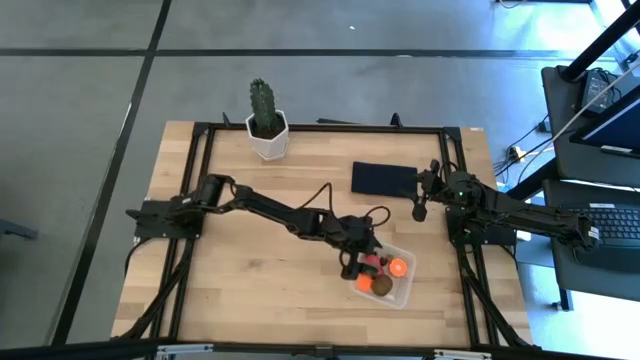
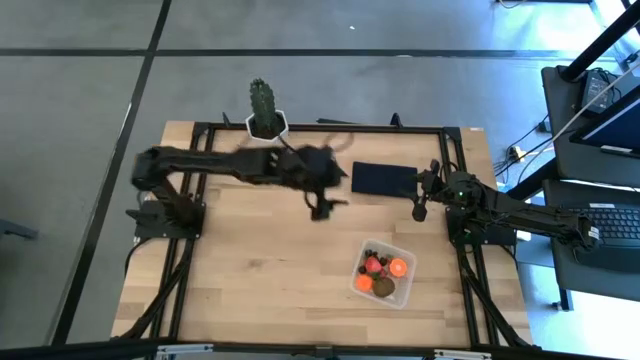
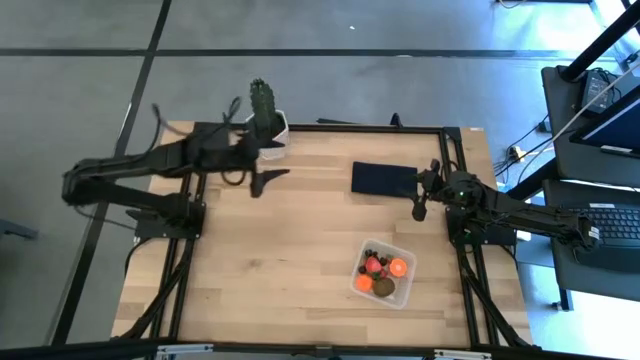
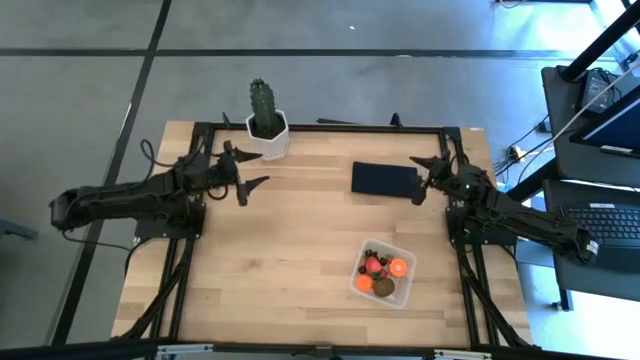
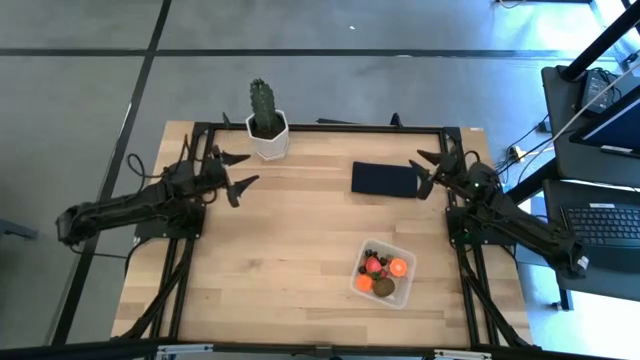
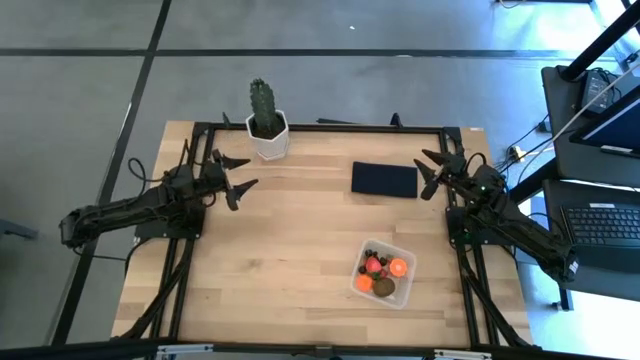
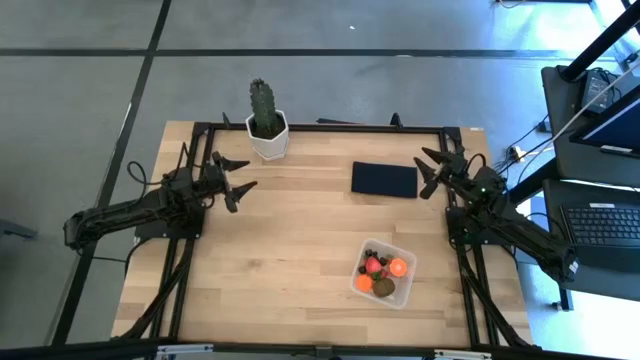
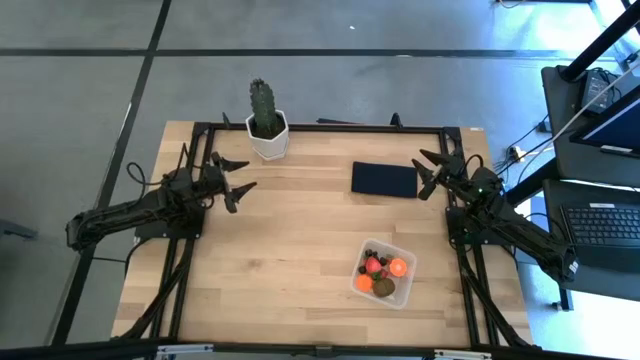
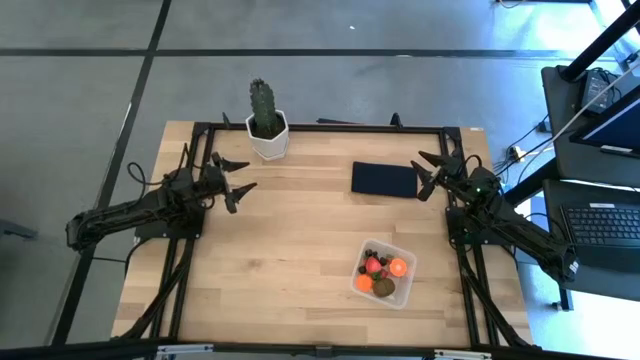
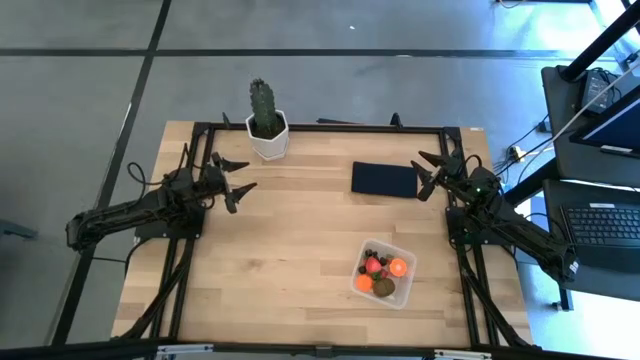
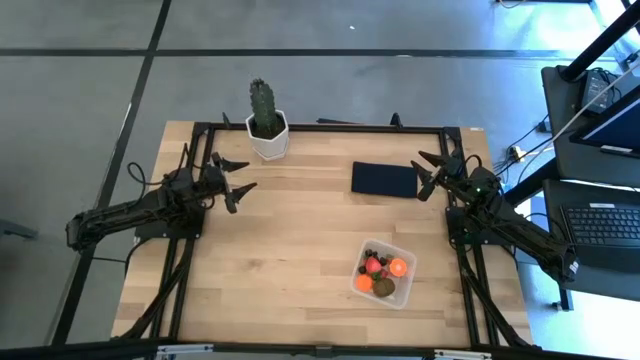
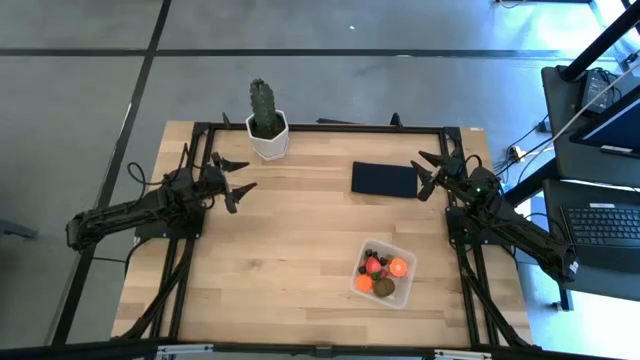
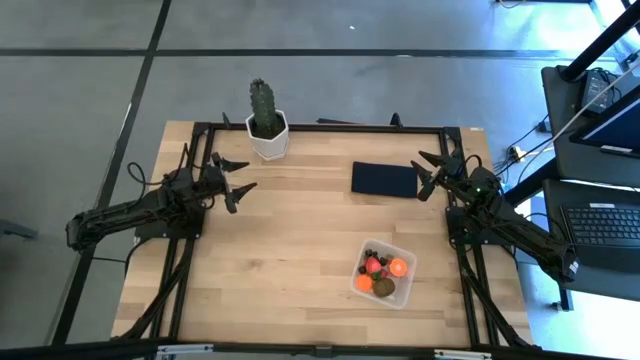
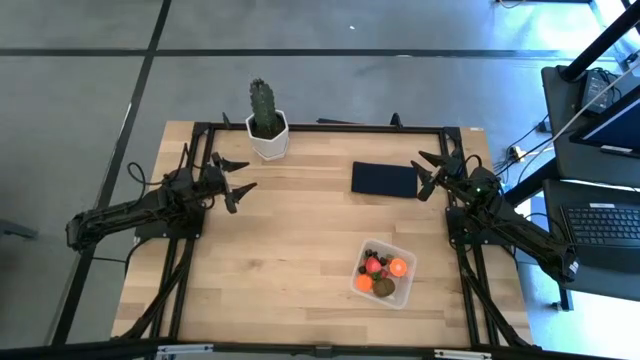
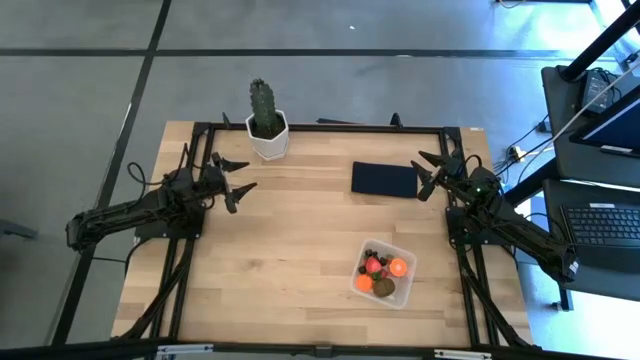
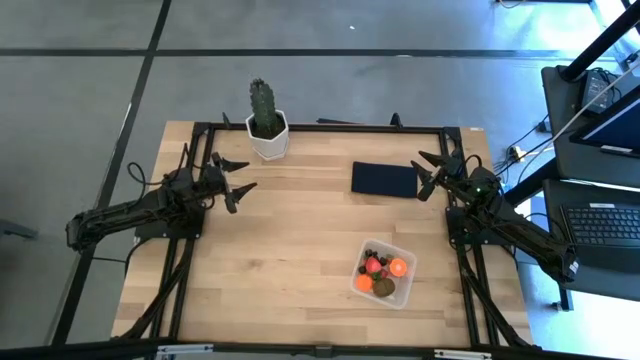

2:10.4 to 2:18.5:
Task: Pick and placing Produce into tupperware
Return to Home Position

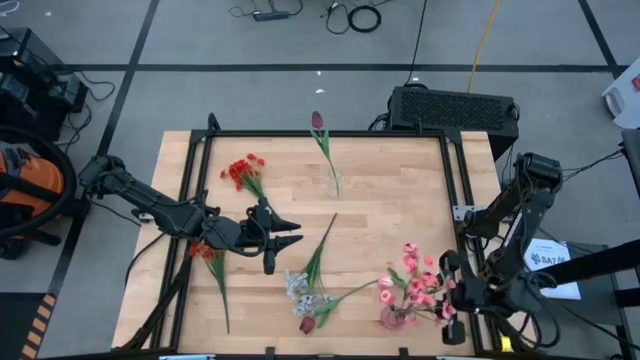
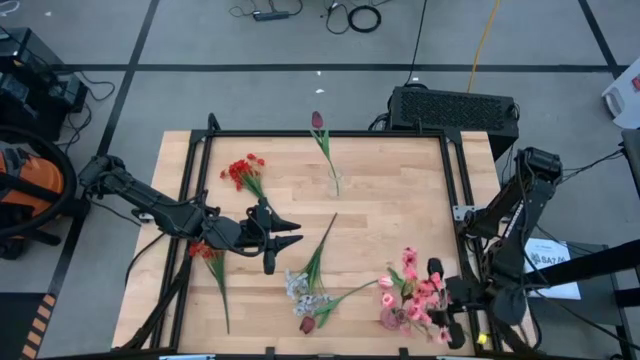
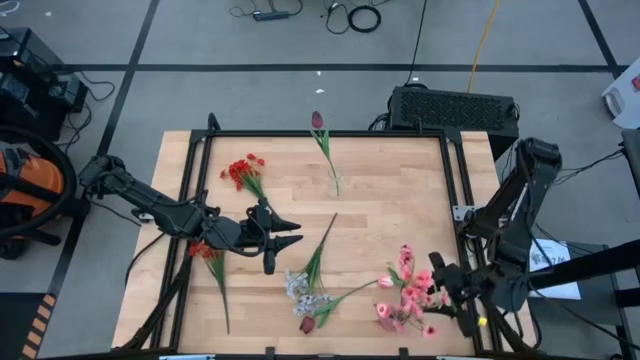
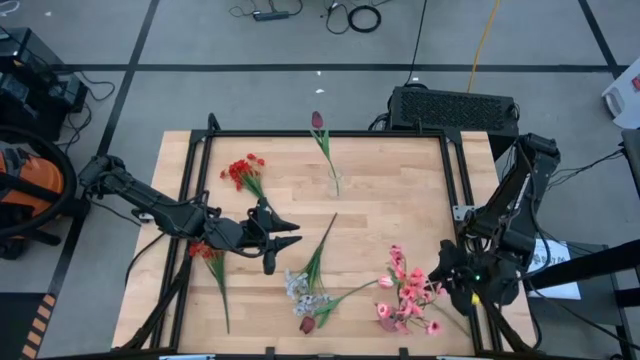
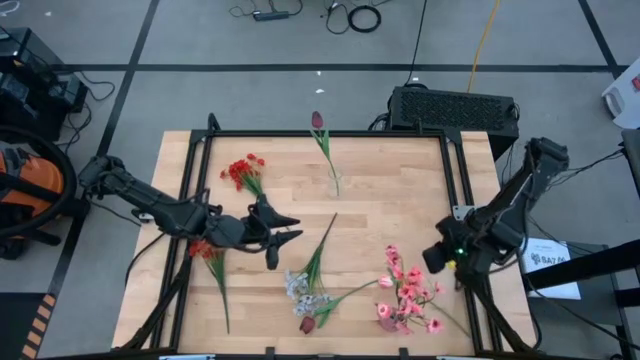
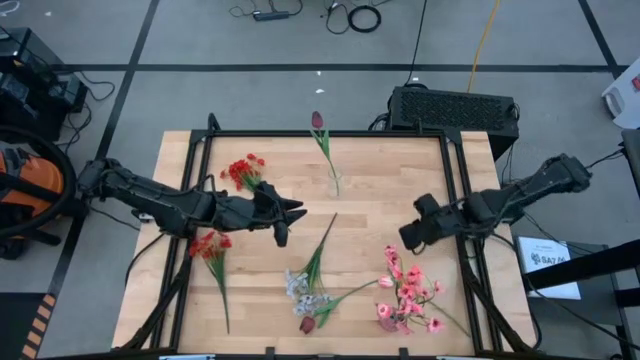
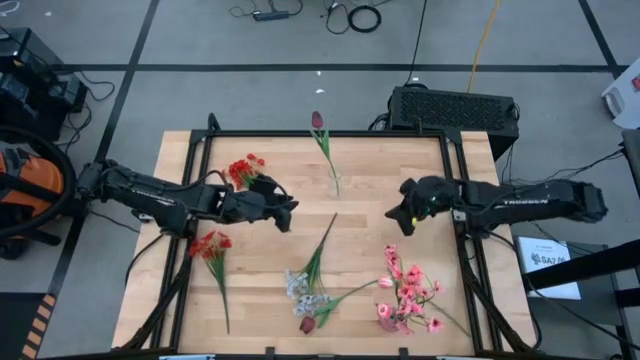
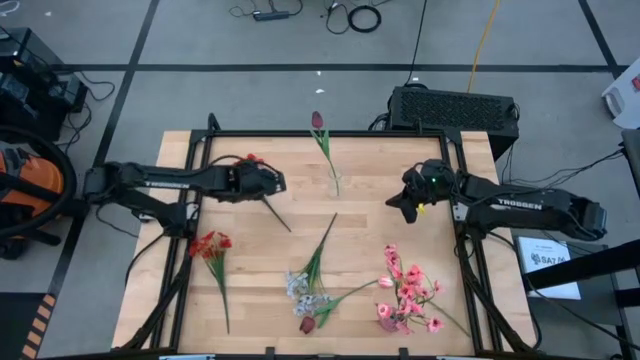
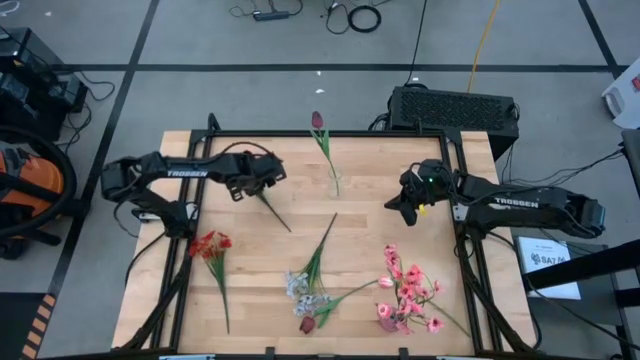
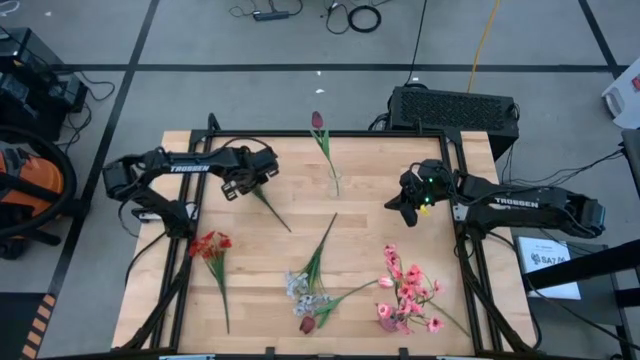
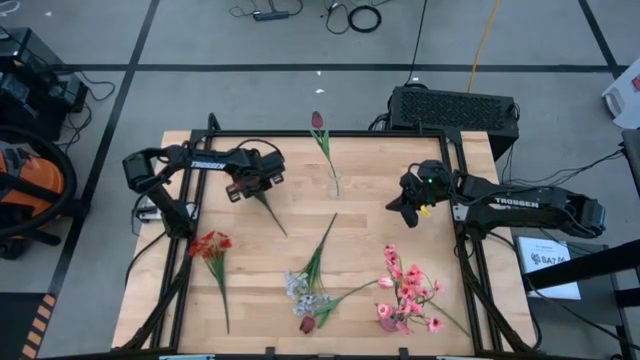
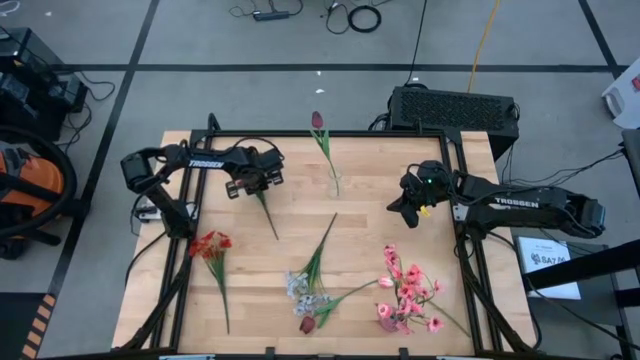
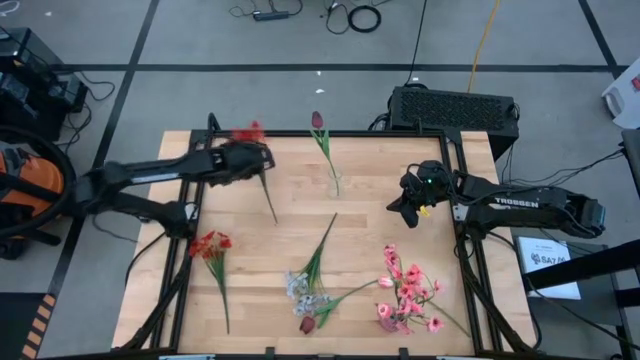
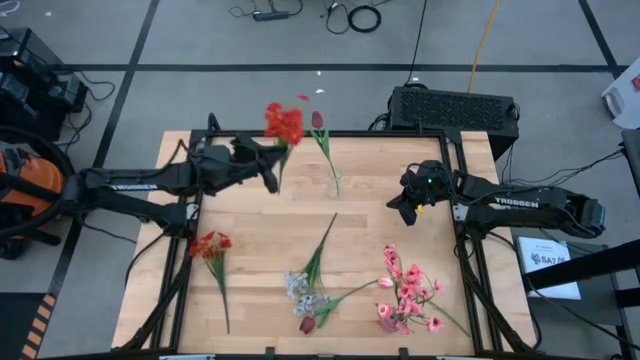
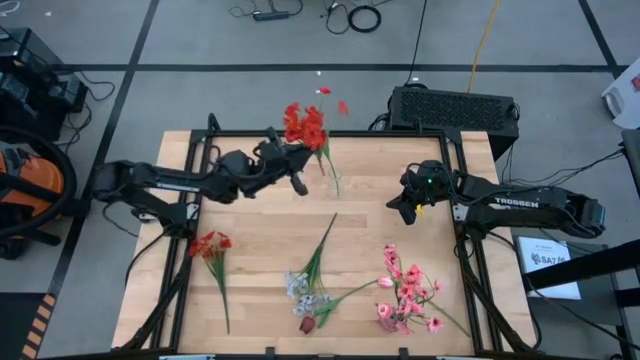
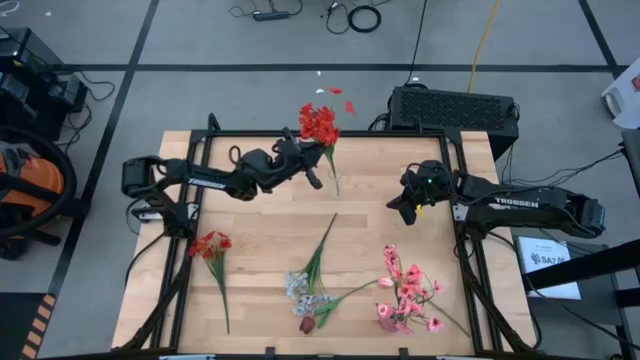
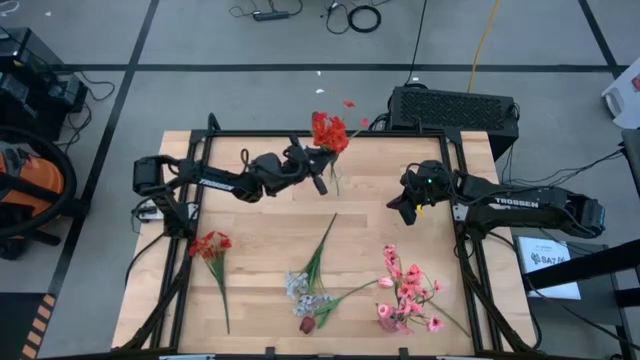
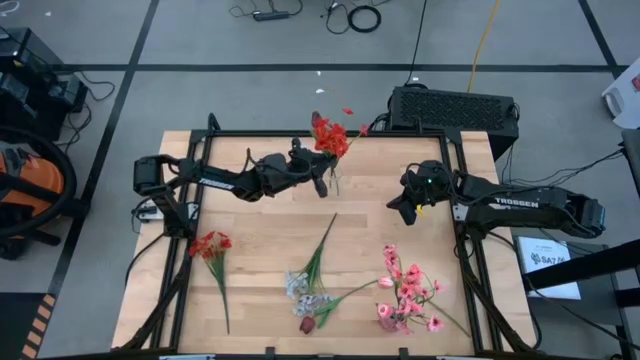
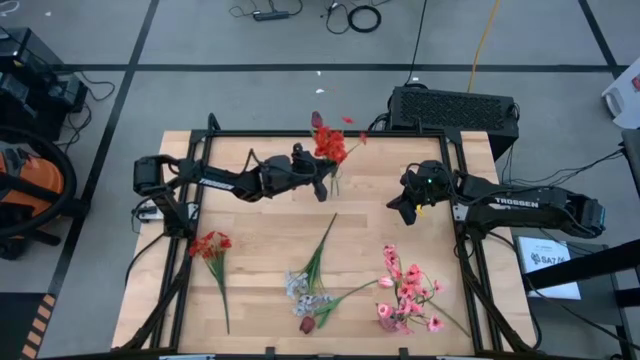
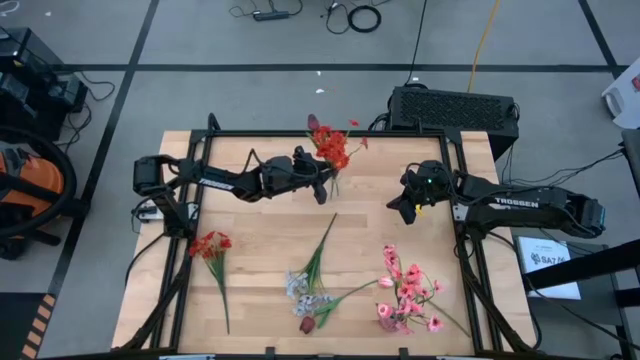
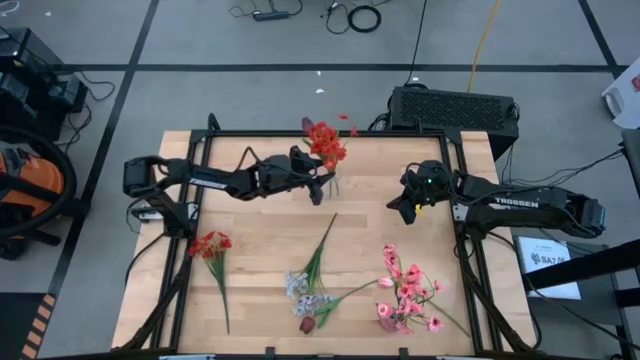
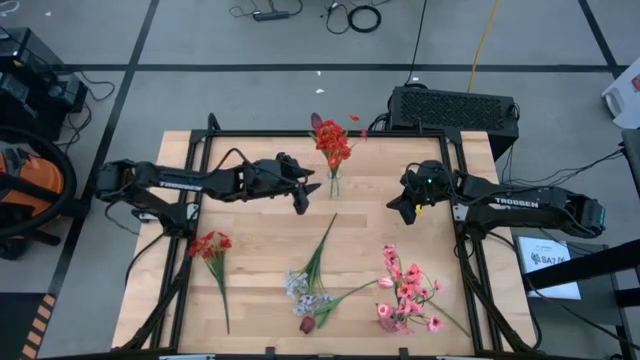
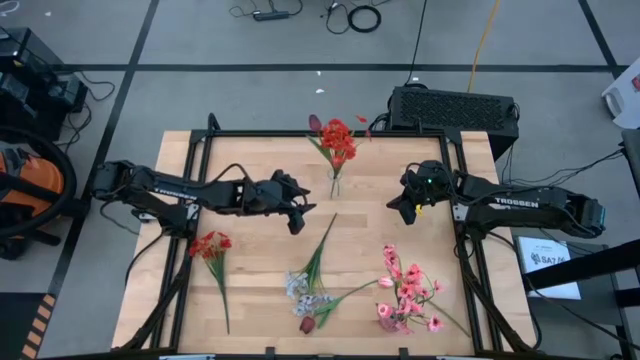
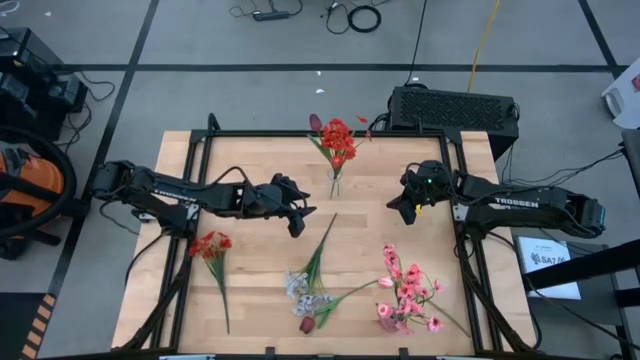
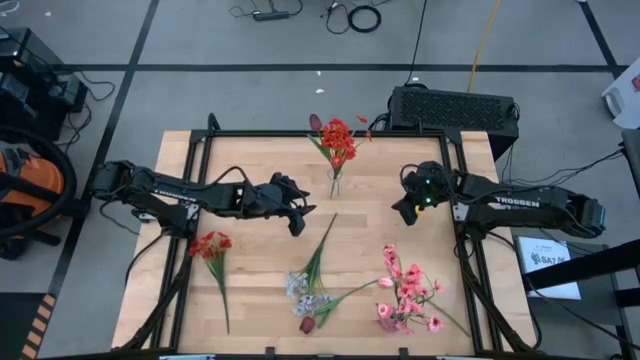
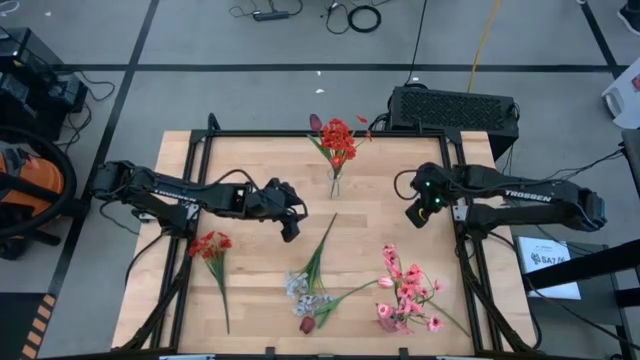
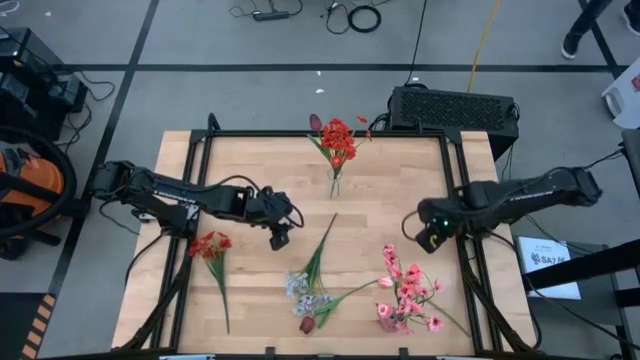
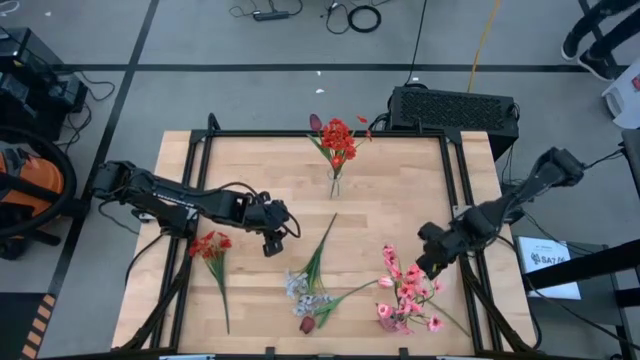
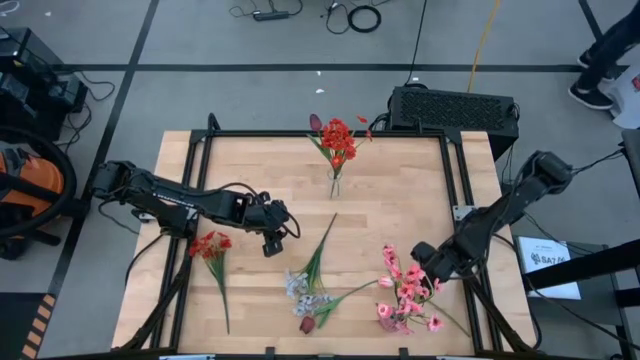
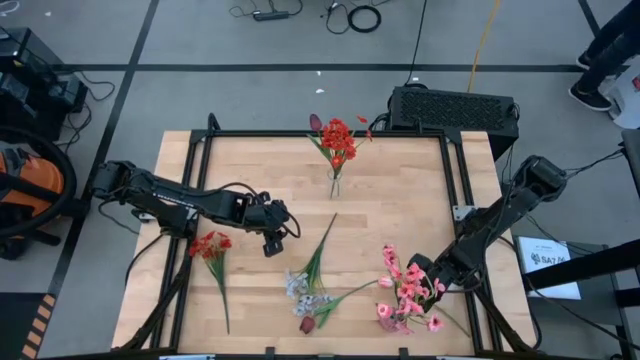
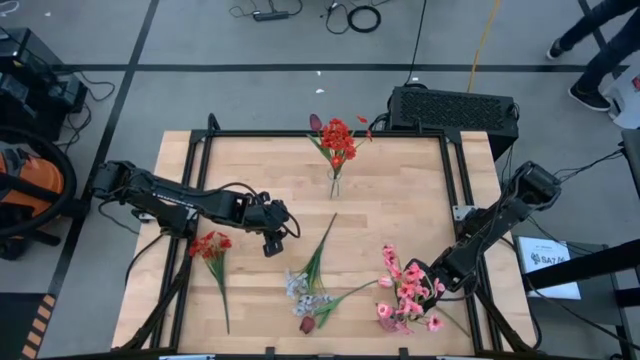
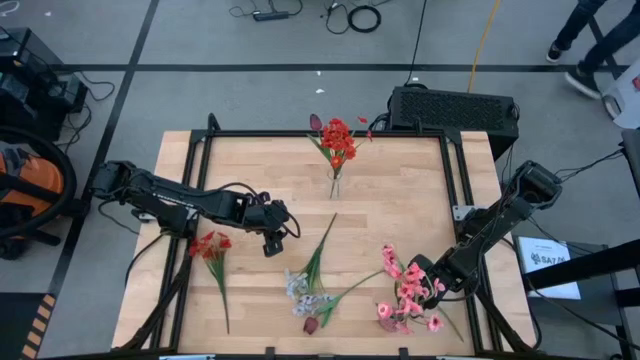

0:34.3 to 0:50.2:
Task: Sort flowers into vase by color
Put the top orange flowers into the transparent vase
